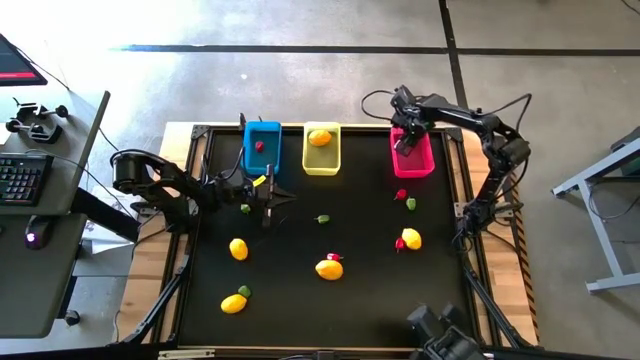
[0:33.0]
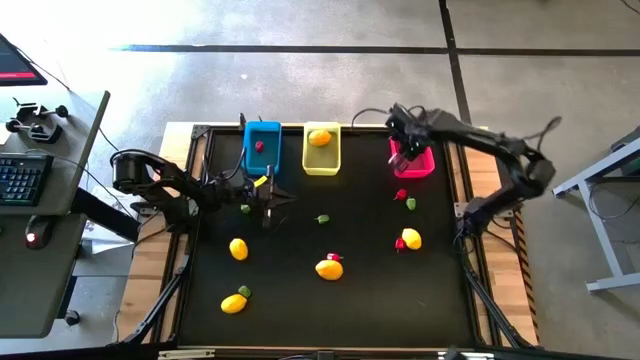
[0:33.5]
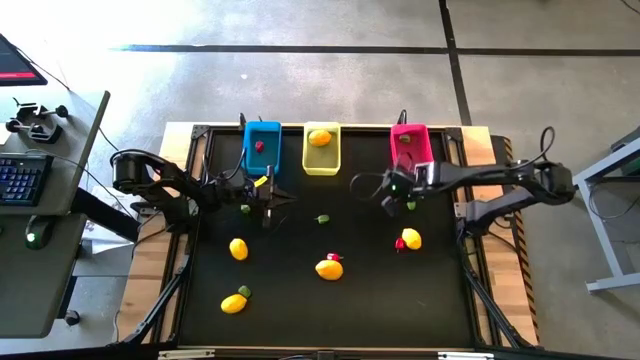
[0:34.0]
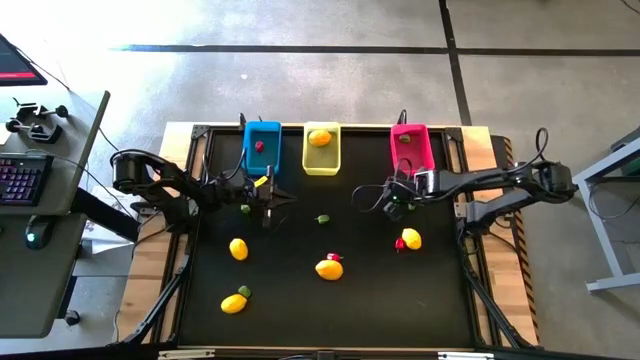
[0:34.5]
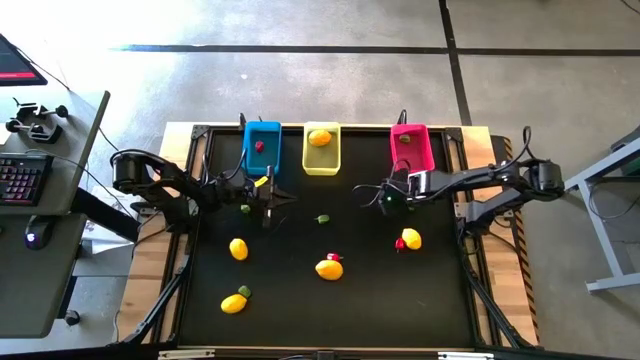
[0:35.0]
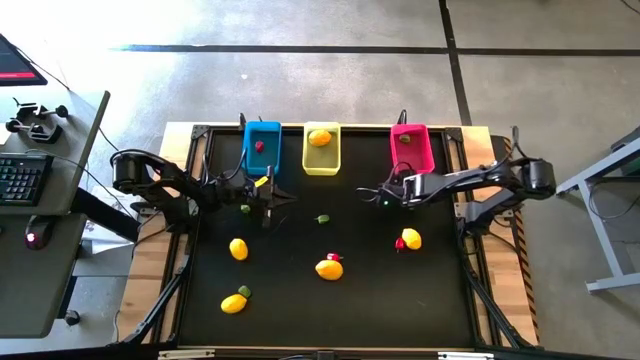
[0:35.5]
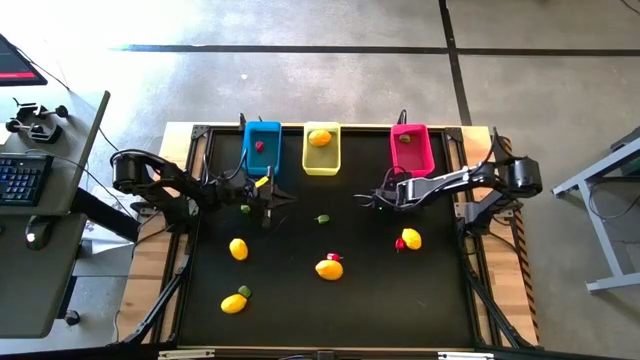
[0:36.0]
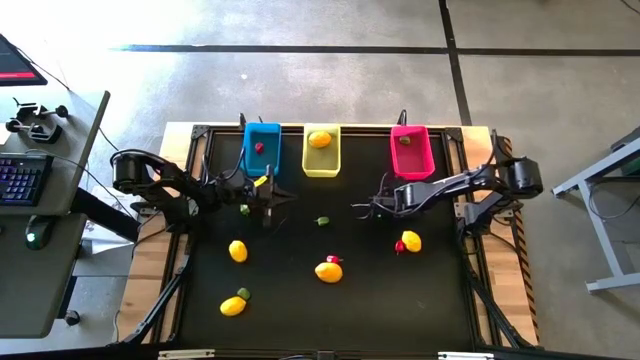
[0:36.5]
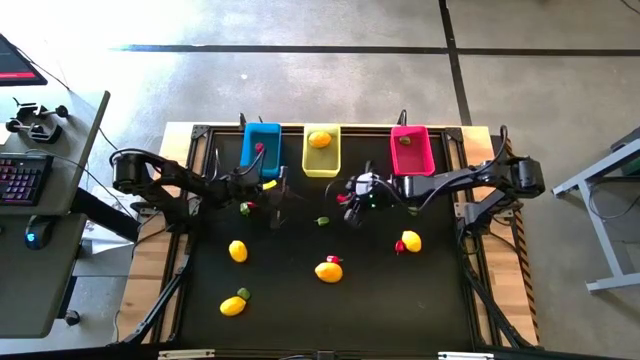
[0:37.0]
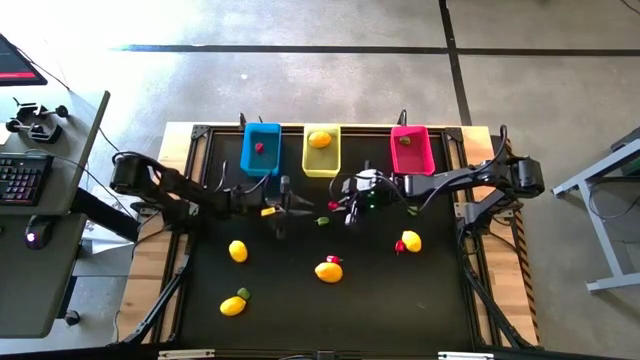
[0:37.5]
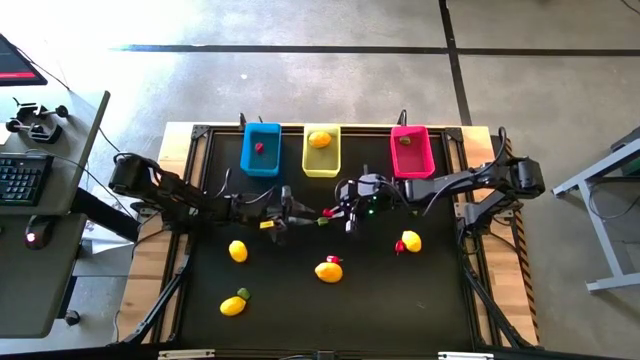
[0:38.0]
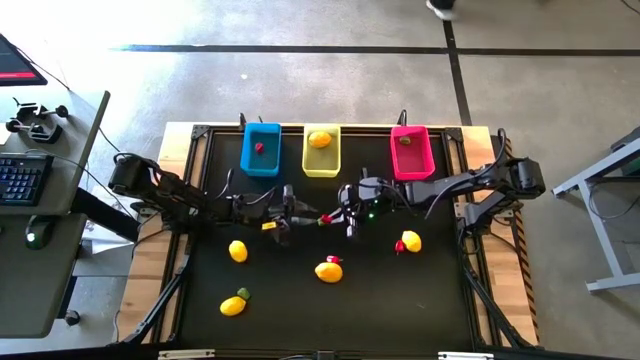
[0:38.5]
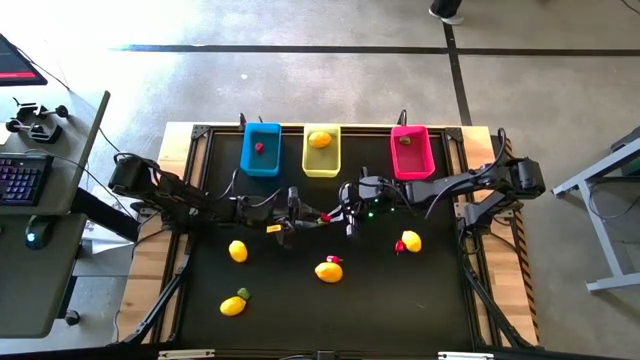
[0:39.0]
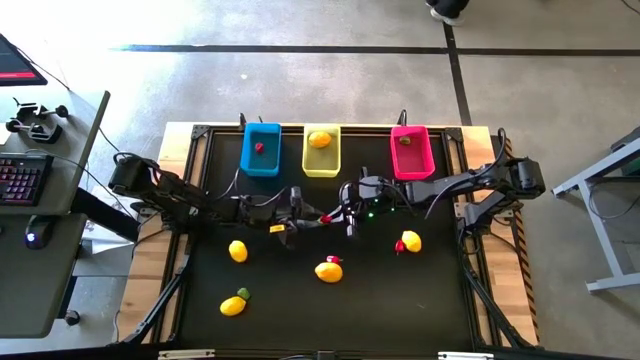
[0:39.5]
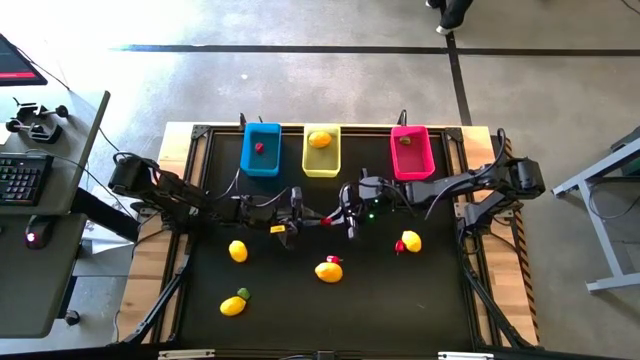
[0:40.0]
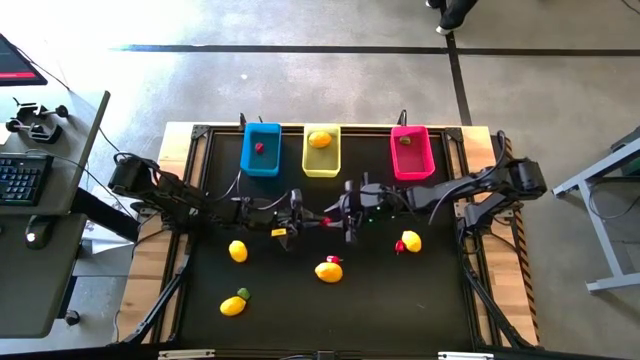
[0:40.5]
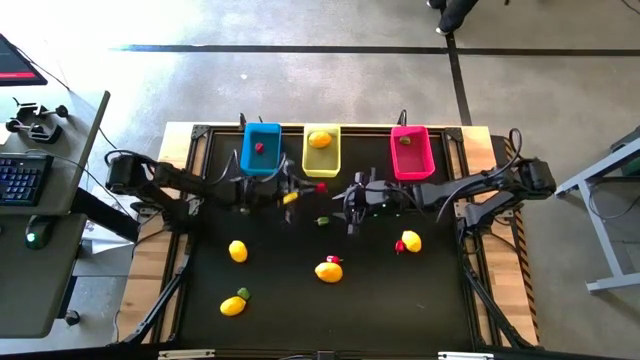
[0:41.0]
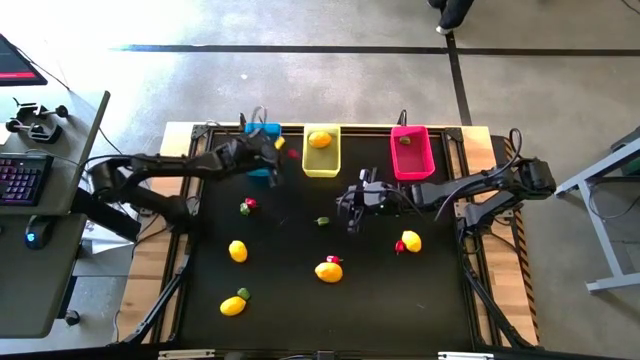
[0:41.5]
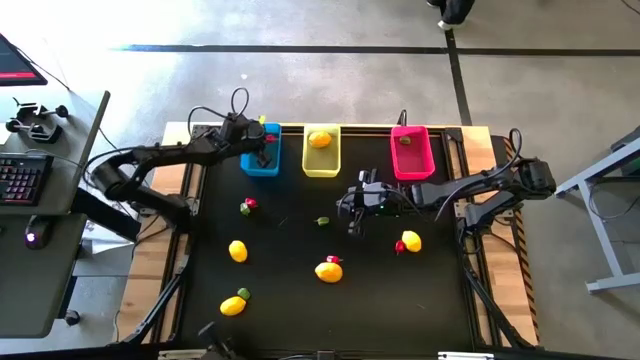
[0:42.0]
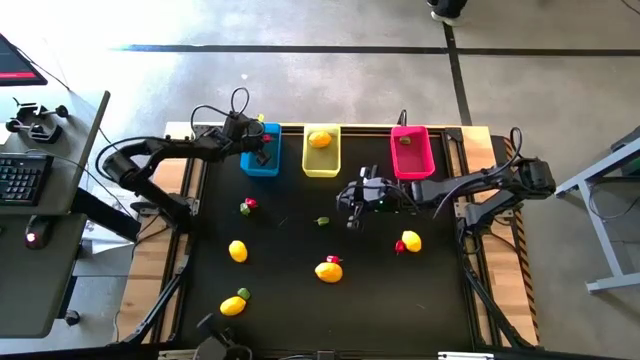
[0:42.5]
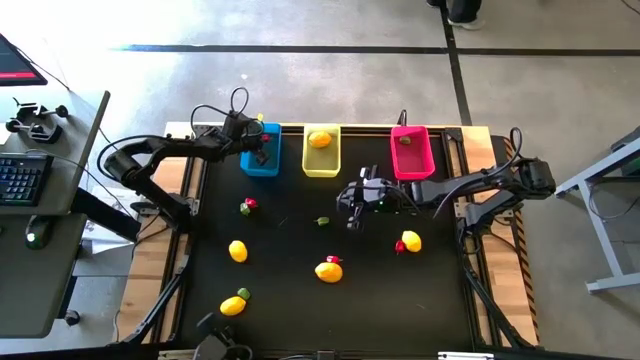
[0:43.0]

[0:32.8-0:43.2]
Task: Sort produce into baskets
Put the red bell pepper into the blue bin

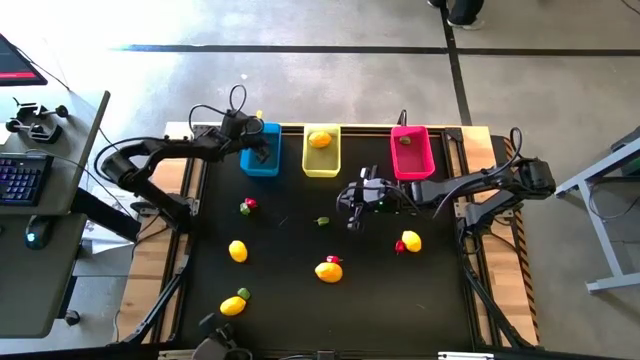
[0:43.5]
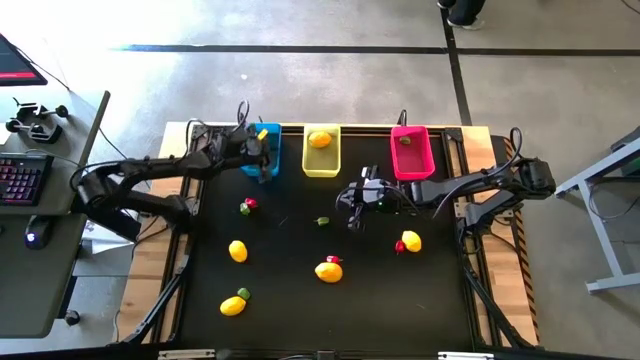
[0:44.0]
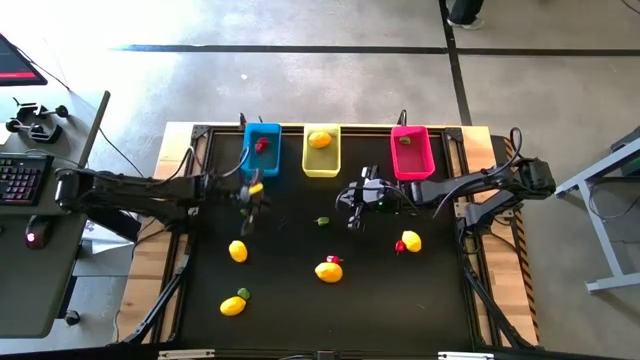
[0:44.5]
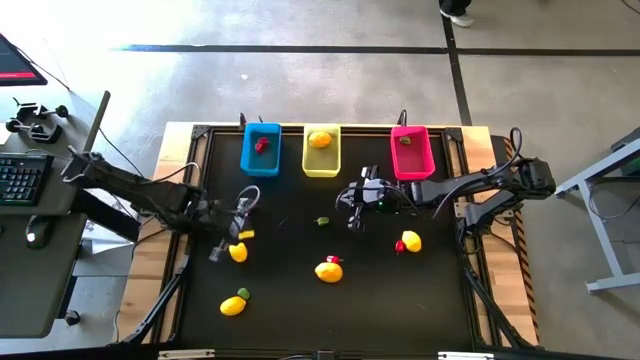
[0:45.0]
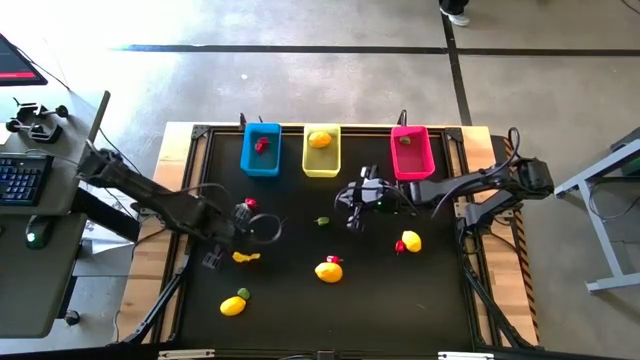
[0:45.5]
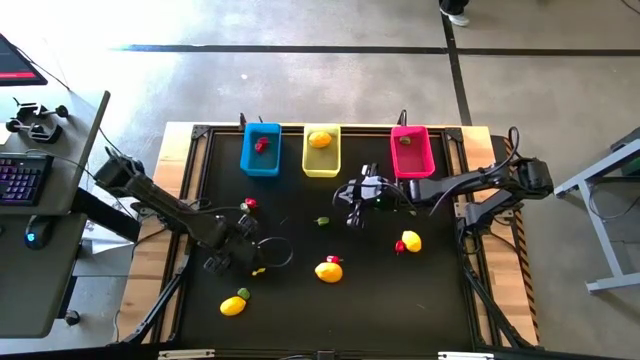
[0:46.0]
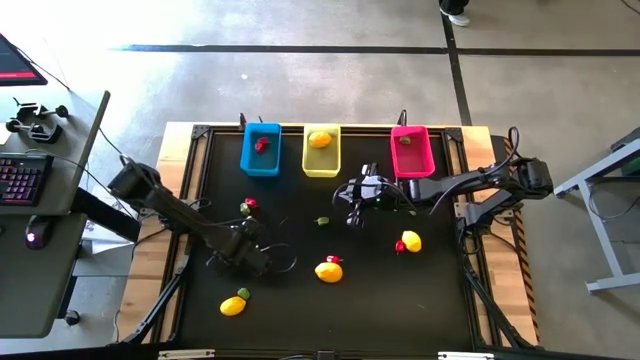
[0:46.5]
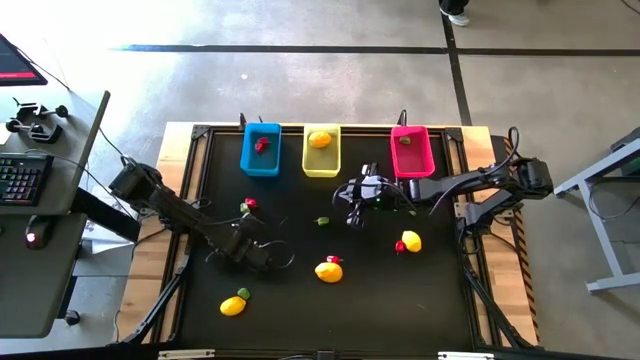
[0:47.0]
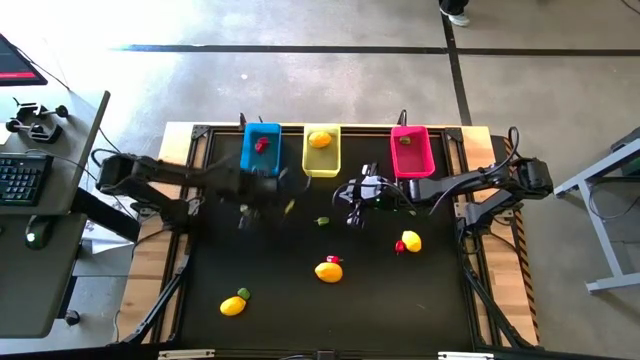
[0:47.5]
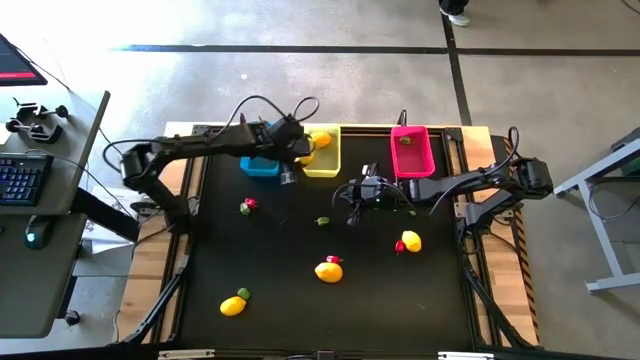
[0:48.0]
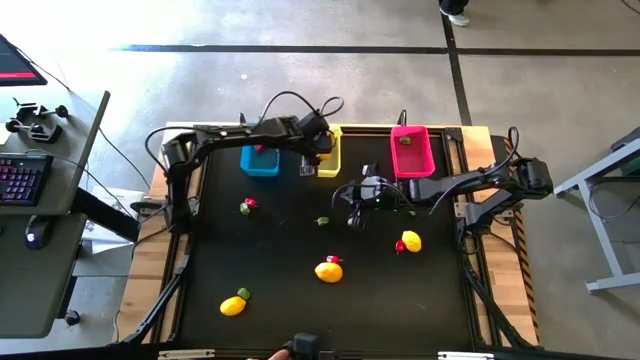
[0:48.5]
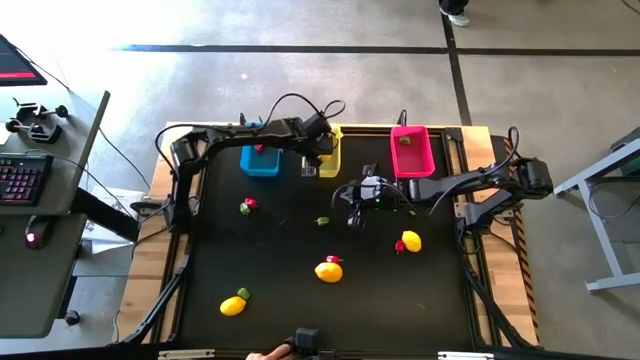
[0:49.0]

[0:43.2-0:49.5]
Put the yellow lemon into the yellow bin

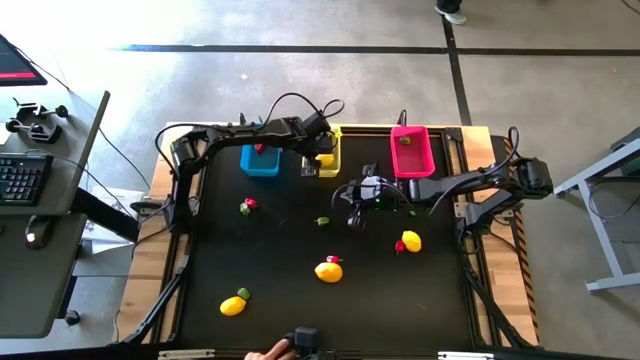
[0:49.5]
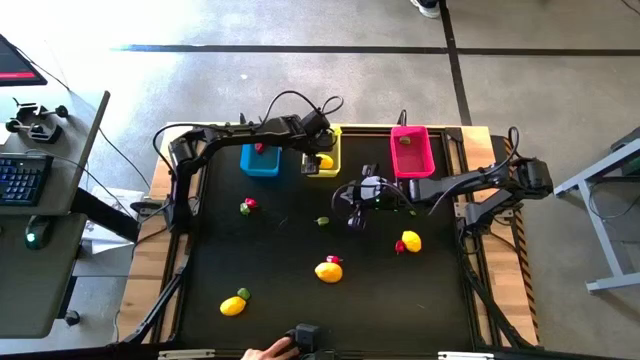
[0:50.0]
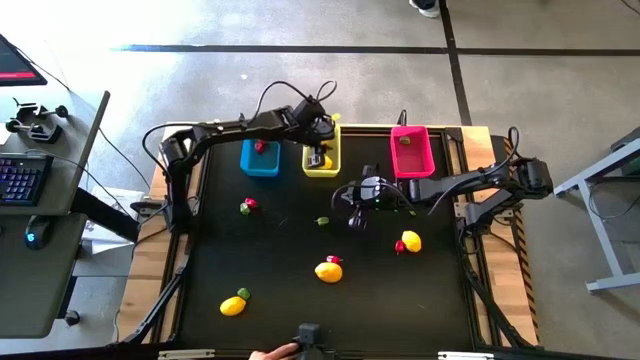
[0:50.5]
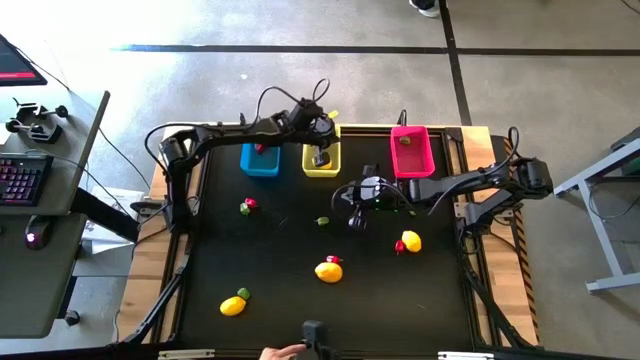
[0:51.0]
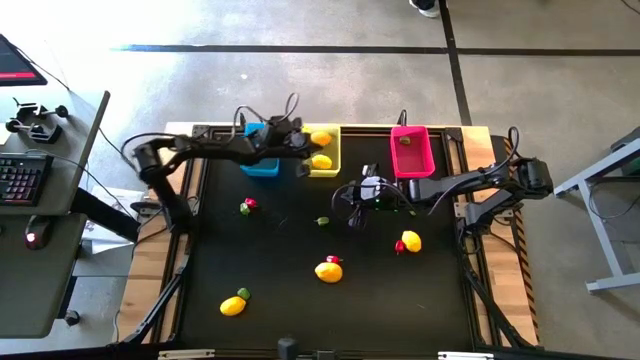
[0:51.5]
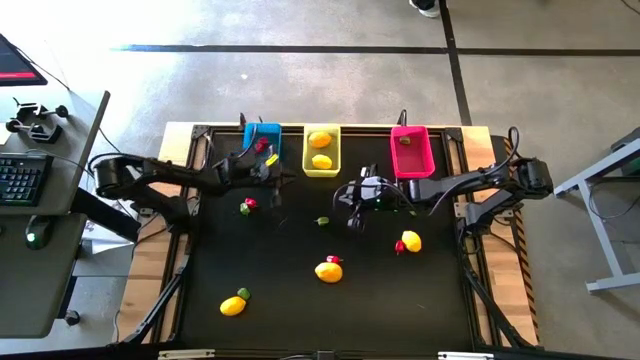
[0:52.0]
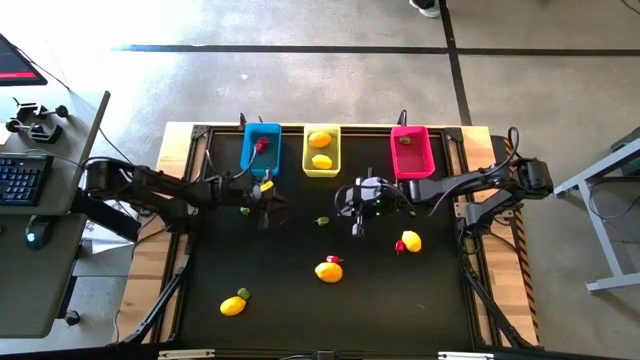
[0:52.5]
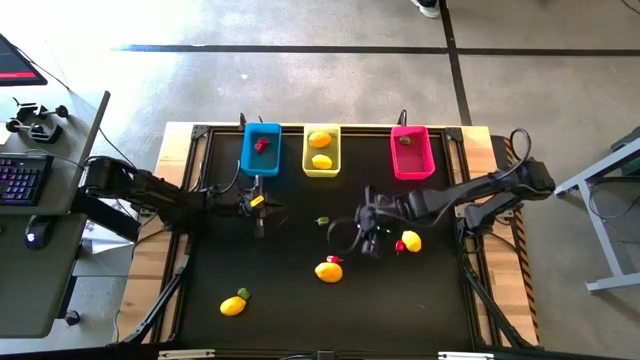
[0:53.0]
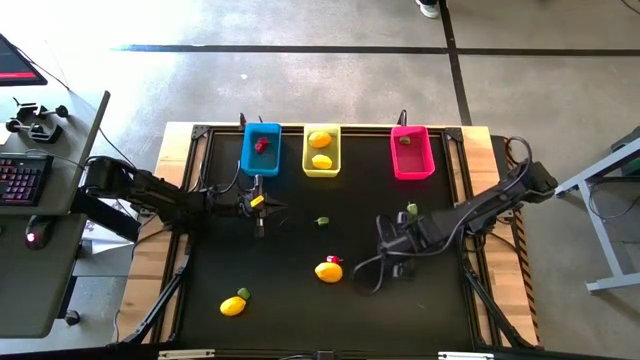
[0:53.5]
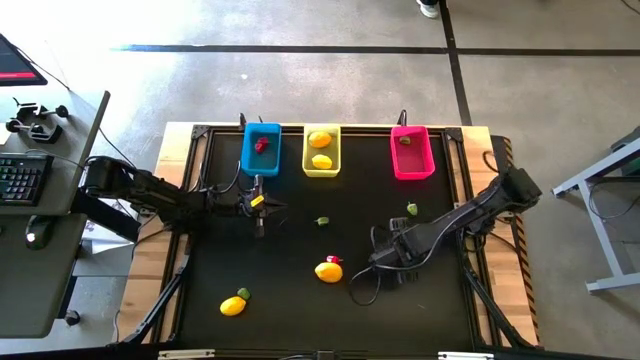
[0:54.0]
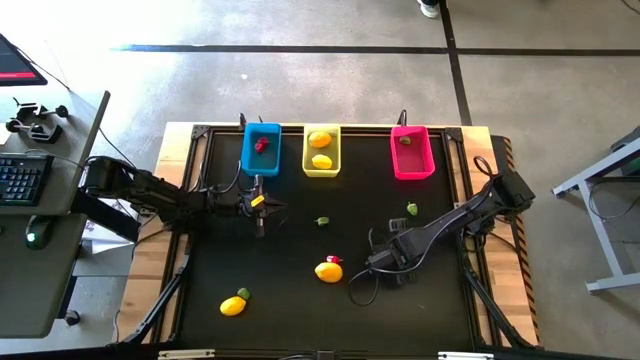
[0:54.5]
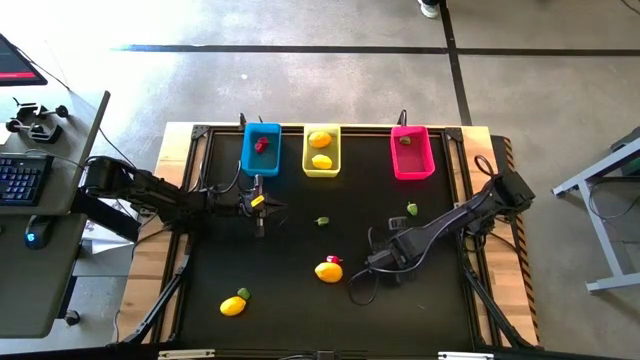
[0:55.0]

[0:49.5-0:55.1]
Put the red bell pepper into the blue bin
